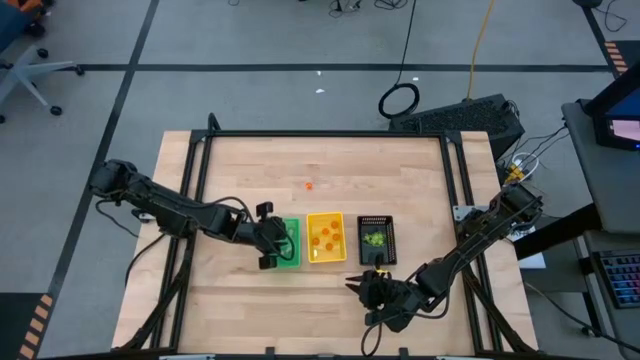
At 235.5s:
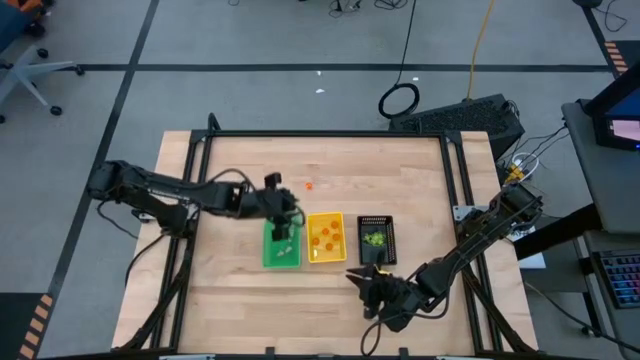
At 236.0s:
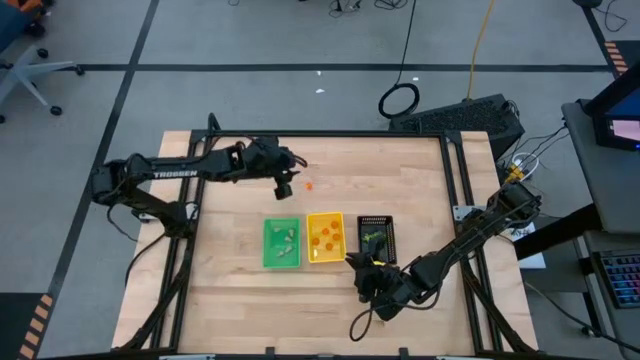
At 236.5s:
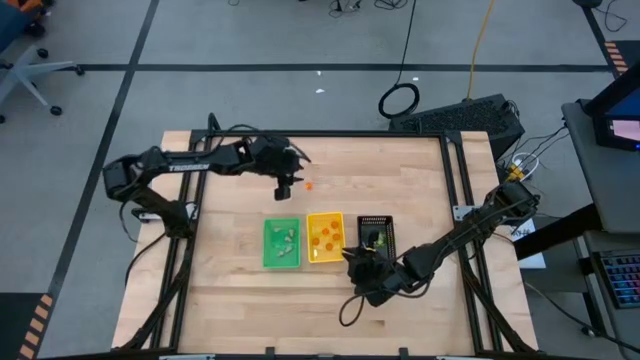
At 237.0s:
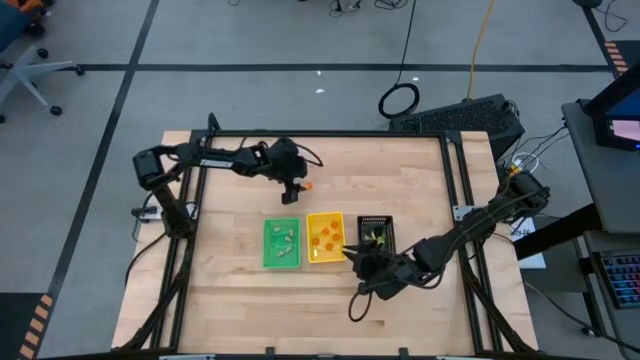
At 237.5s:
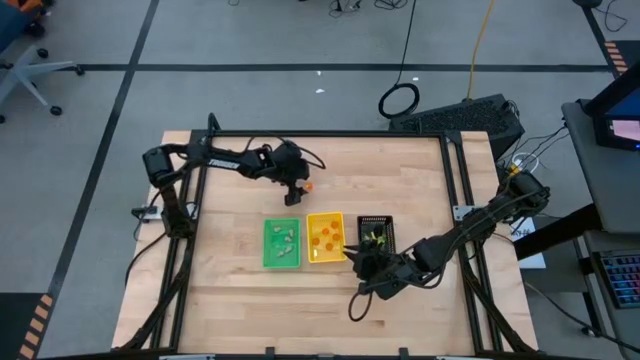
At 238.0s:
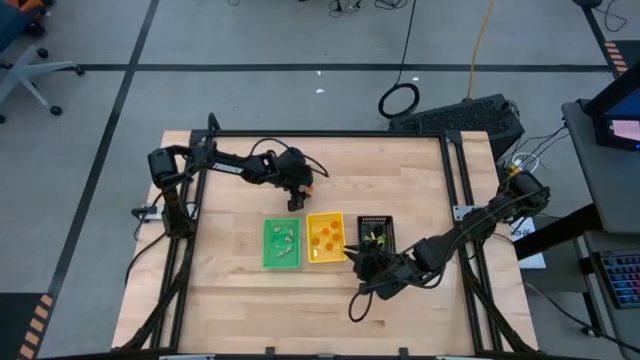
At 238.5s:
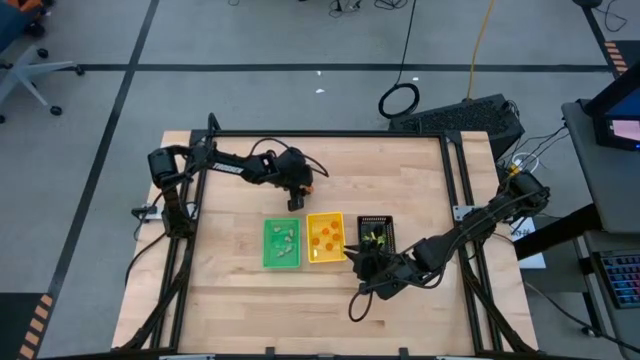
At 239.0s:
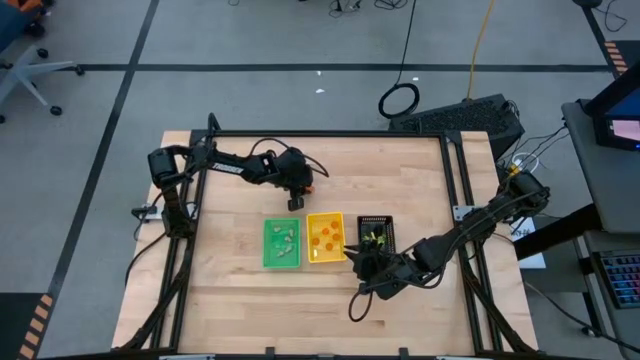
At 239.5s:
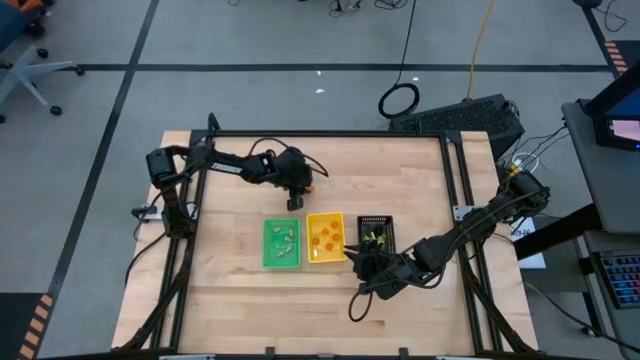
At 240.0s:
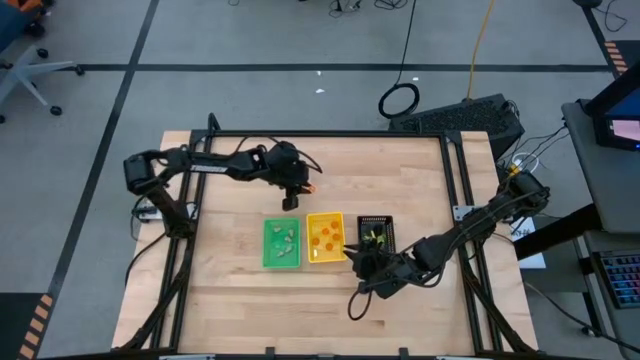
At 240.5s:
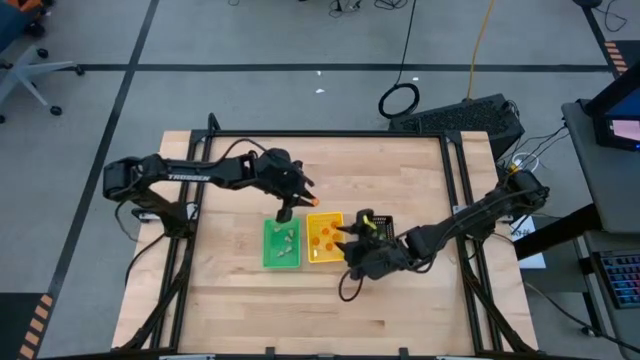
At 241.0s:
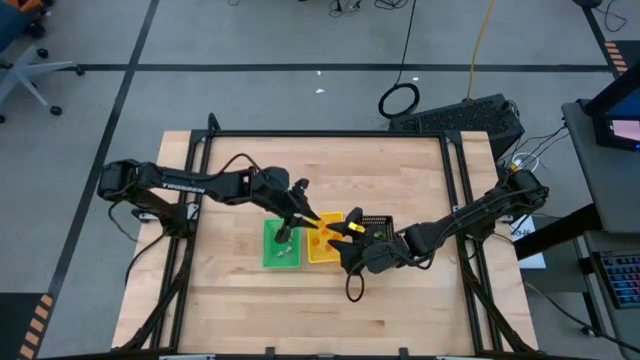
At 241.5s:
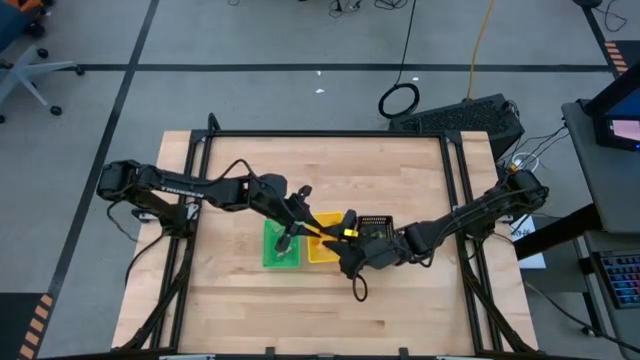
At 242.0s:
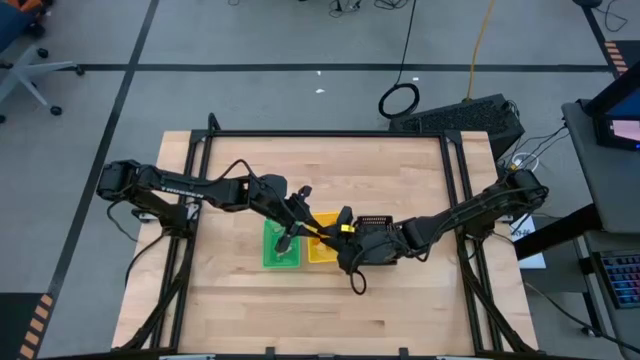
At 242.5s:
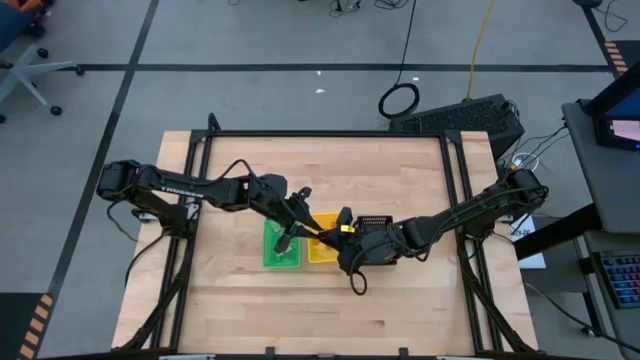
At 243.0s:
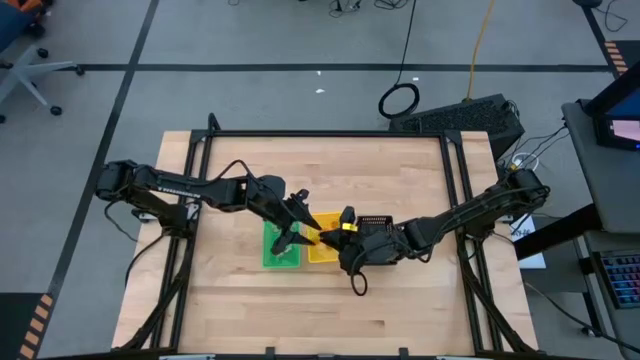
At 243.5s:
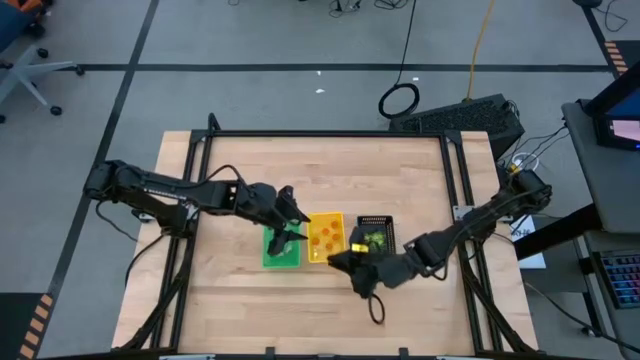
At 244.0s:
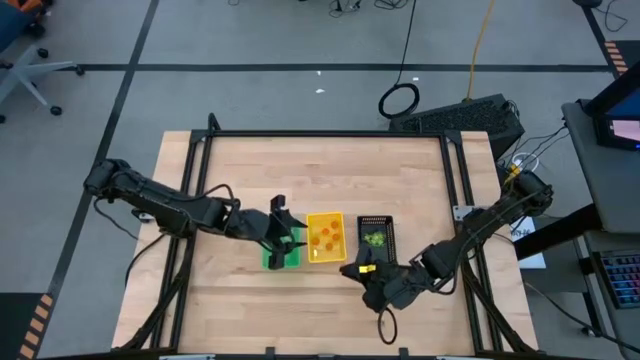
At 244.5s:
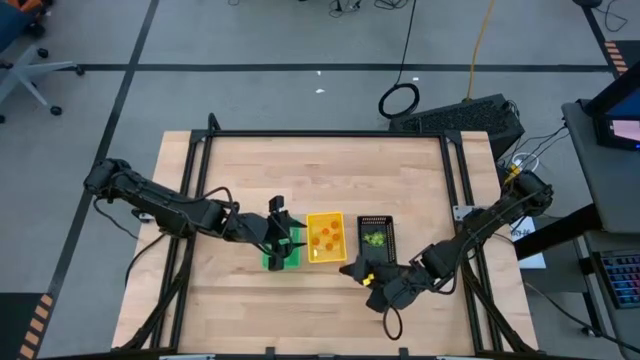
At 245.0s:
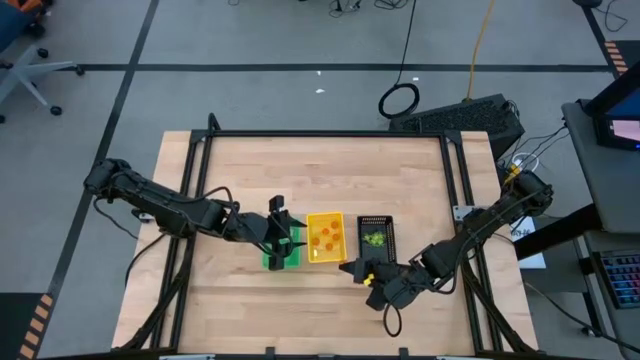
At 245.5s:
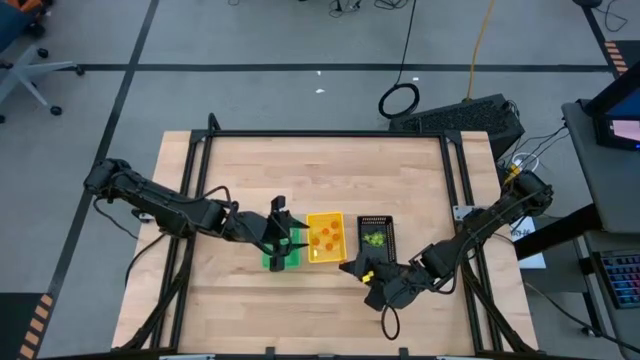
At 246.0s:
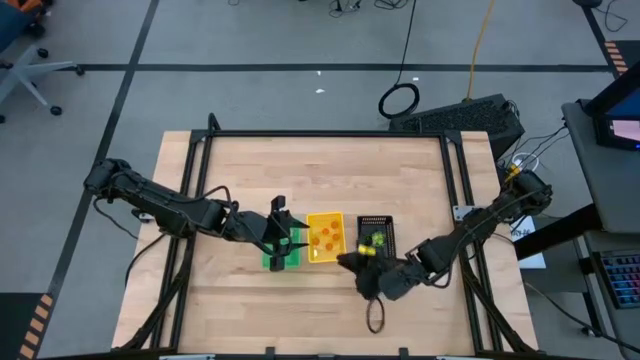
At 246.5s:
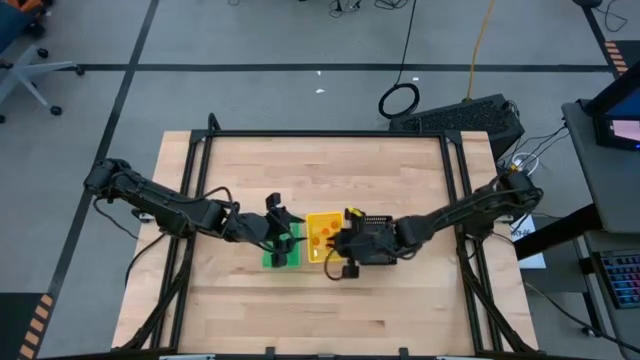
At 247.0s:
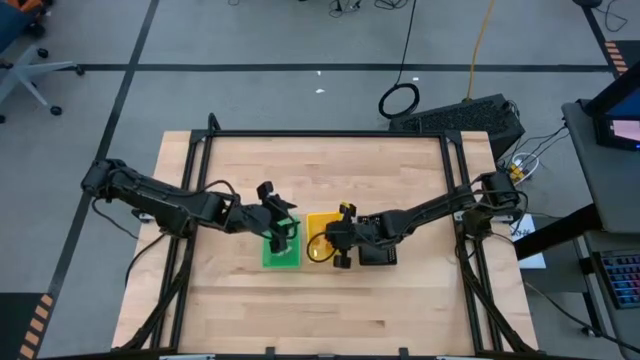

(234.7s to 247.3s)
Task: Sort Halloween decoration
Put the orange pumpkin toy into the yellow basket
